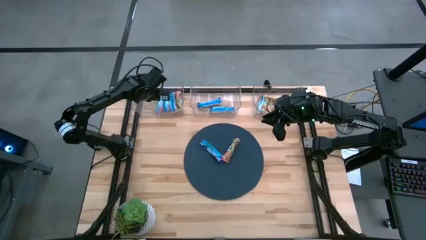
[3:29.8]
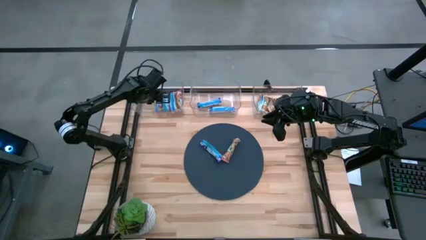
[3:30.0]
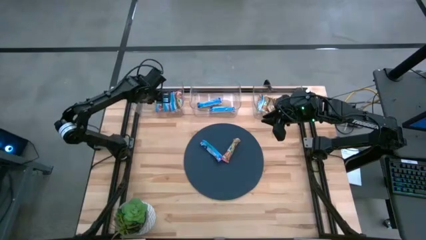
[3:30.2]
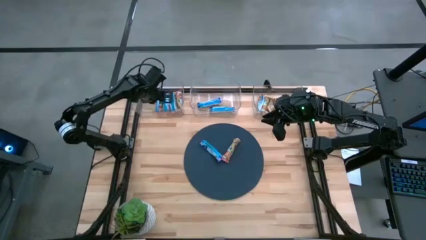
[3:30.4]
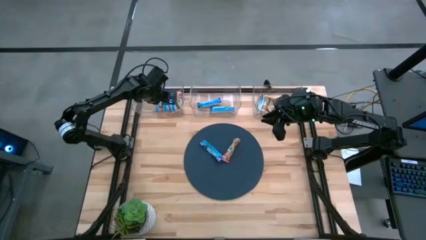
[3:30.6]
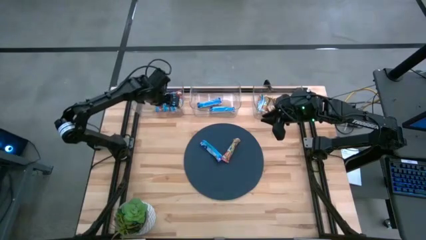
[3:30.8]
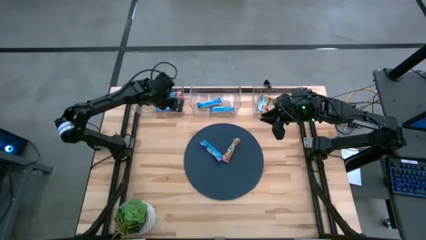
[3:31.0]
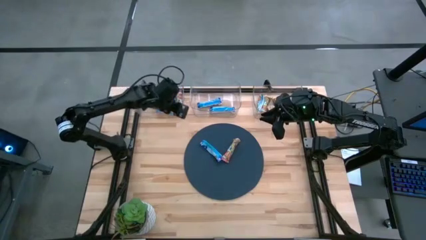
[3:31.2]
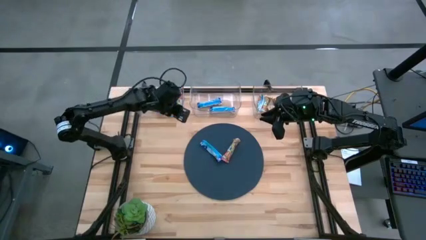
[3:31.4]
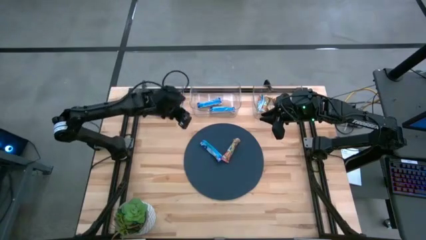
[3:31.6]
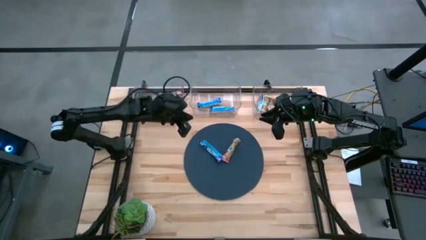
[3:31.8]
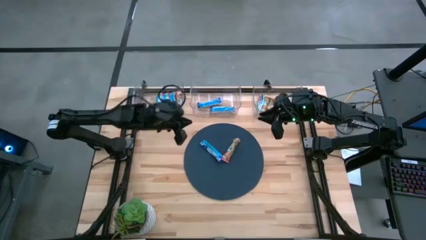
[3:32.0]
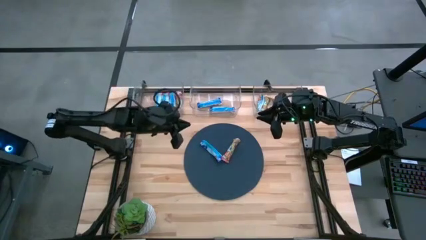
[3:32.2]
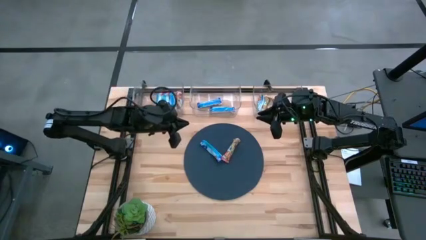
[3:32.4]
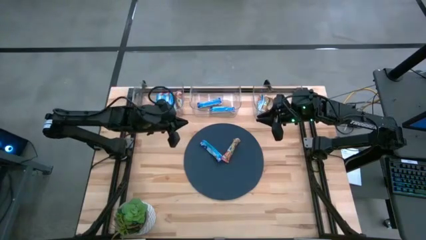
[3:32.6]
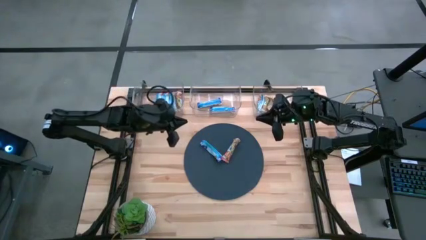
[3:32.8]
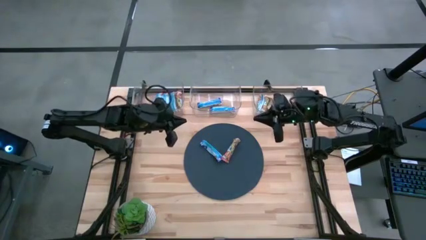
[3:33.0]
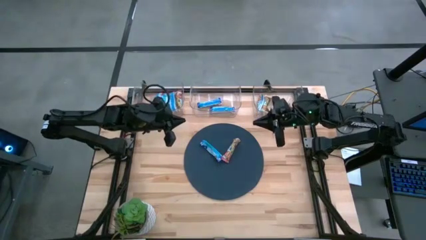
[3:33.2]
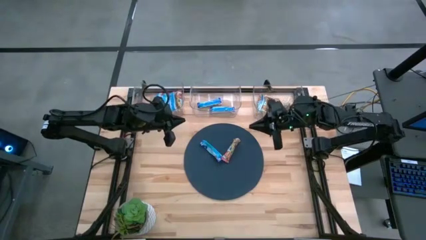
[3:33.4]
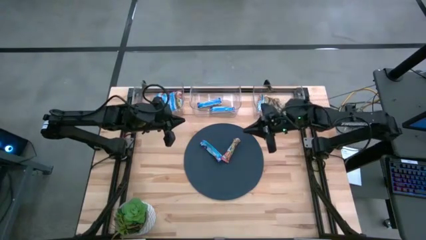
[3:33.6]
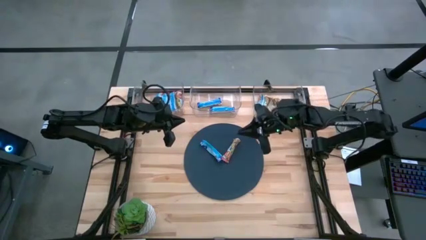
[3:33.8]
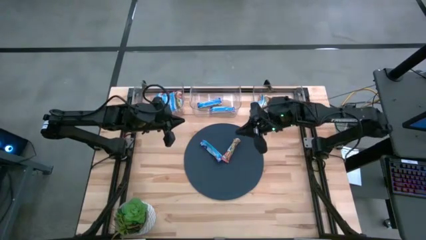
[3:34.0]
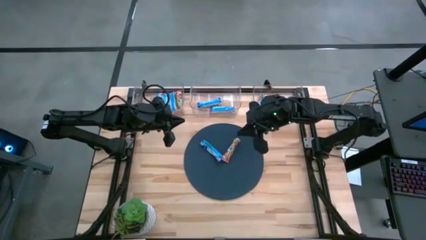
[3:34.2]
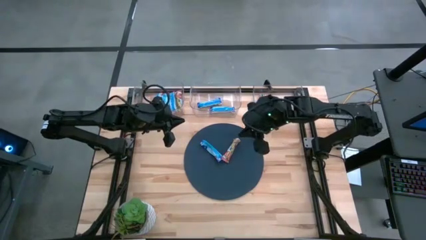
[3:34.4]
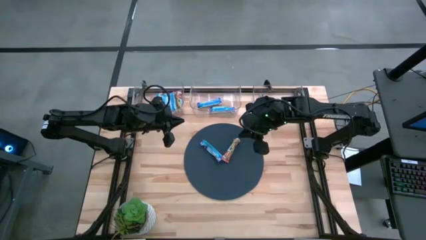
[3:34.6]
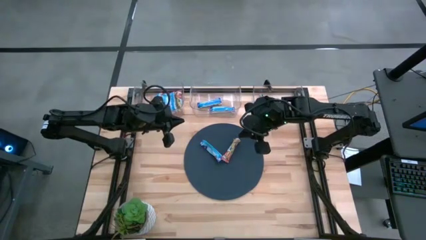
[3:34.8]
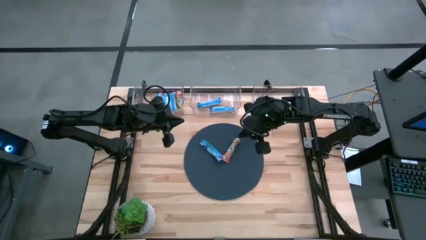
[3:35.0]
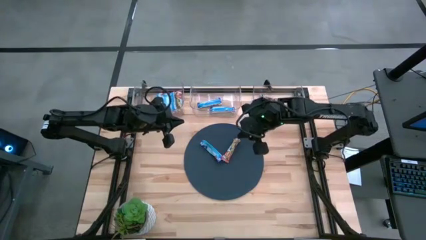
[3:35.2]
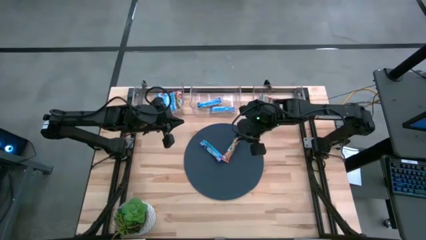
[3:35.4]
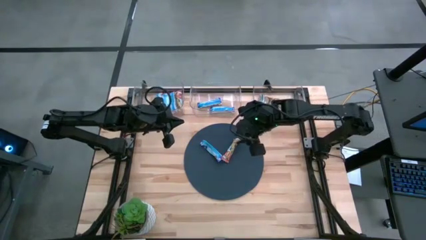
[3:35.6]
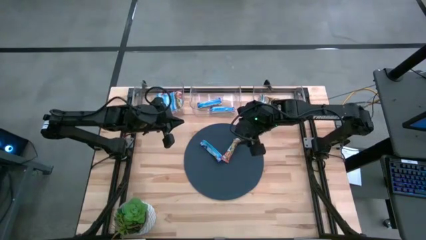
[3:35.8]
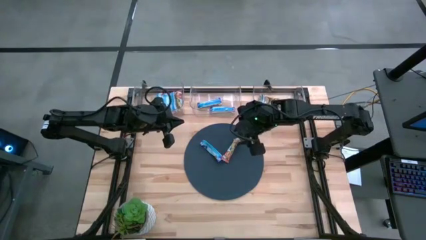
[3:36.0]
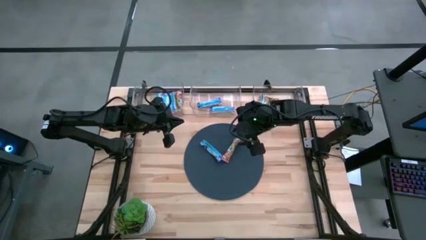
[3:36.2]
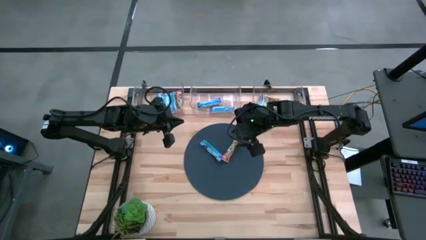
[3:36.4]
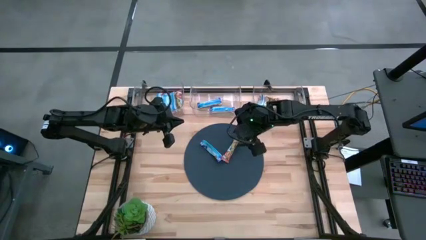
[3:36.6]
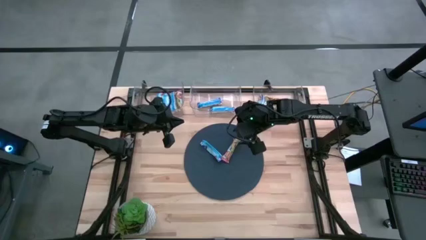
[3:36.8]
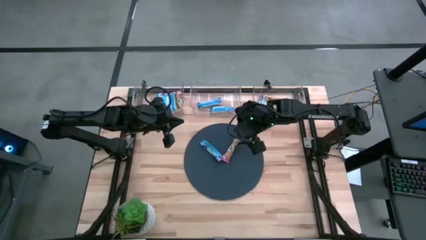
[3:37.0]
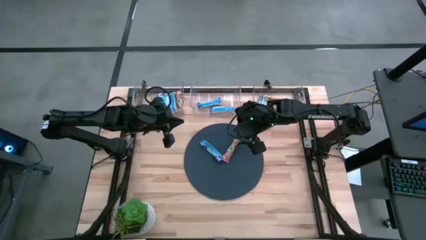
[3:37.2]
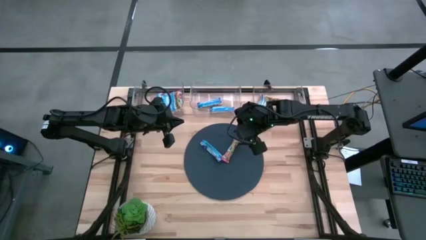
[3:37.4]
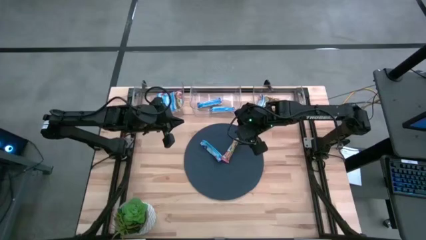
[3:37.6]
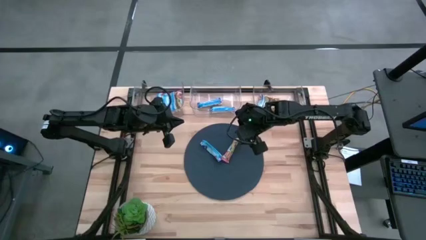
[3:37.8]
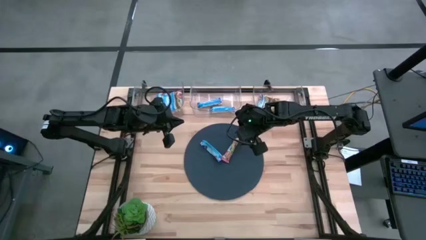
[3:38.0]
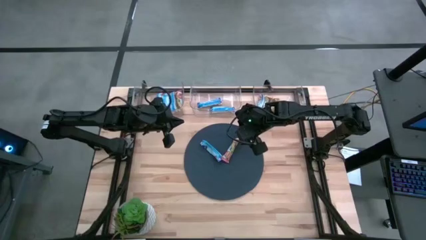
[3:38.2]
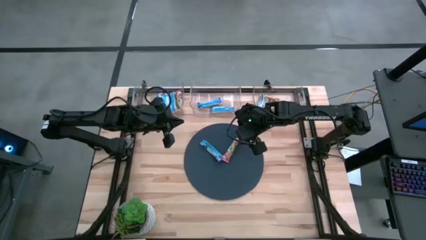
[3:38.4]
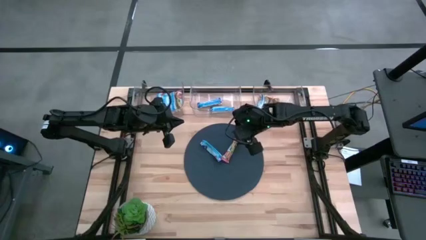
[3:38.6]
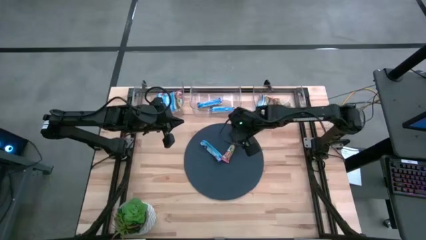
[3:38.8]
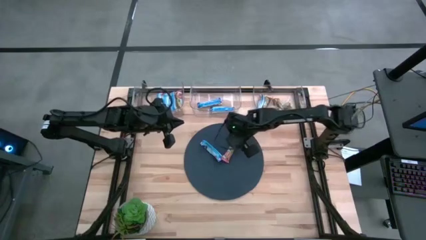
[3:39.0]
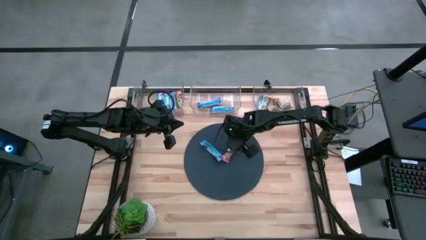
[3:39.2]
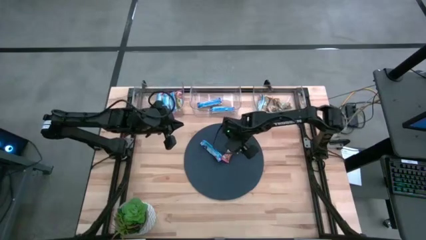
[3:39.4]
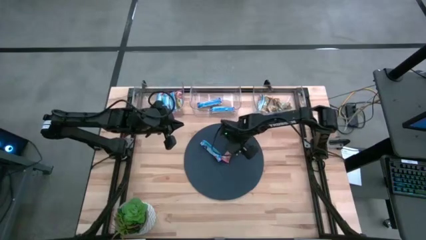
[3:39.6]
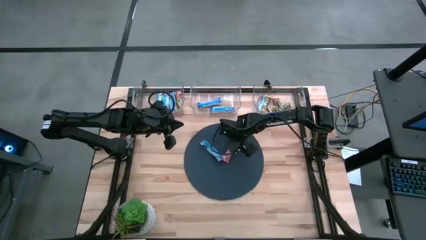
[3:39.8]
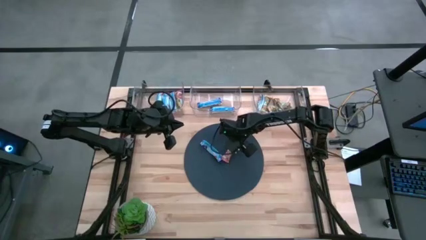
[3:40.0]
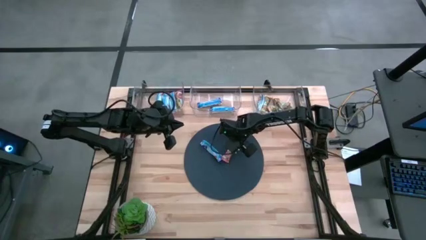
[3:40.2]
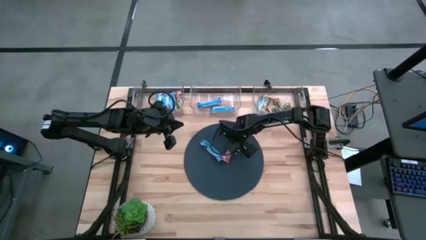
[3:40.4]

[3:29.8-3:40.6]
Task: Pick and place Granola Bars by type
Put the red granola bar into the left transparent bin

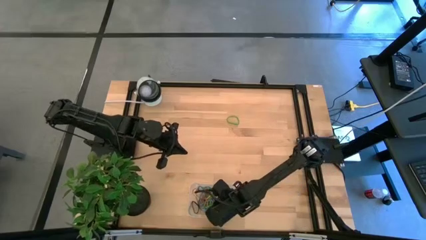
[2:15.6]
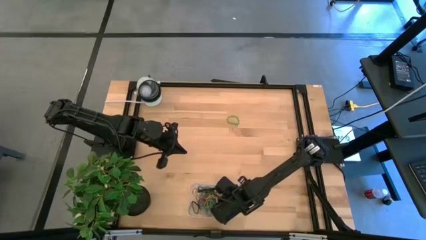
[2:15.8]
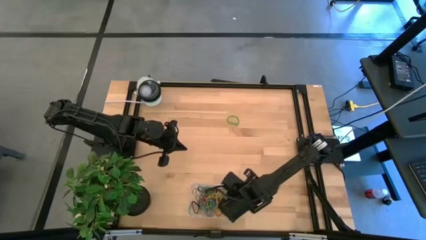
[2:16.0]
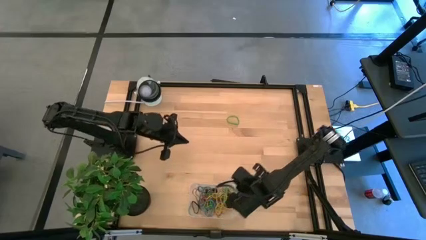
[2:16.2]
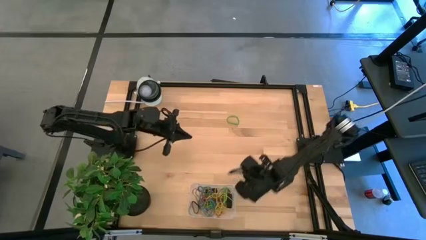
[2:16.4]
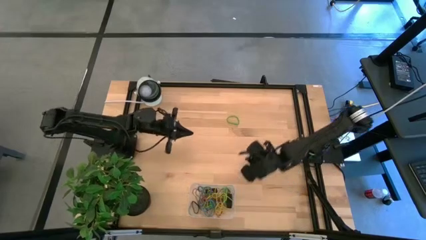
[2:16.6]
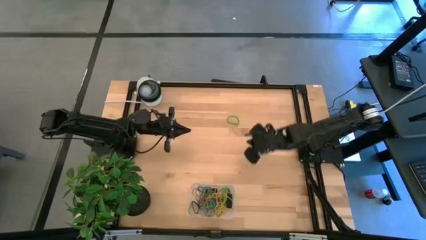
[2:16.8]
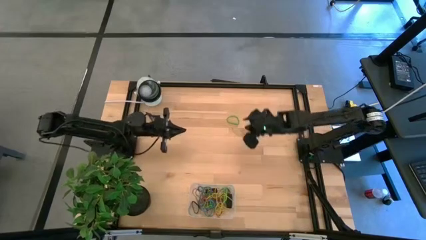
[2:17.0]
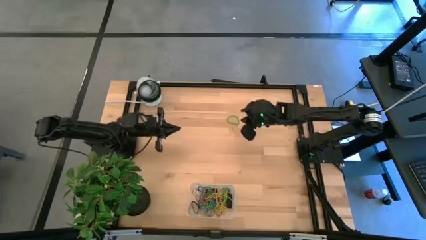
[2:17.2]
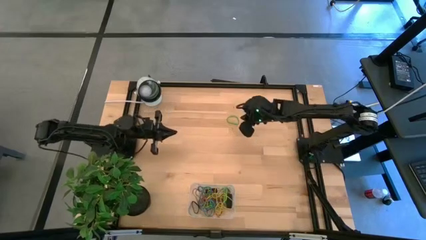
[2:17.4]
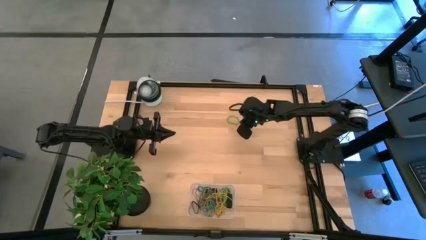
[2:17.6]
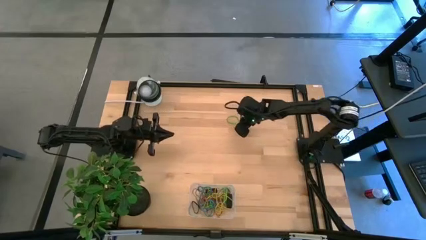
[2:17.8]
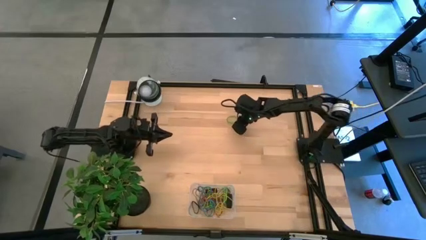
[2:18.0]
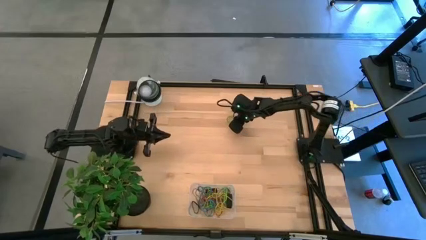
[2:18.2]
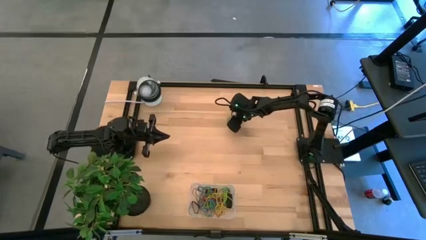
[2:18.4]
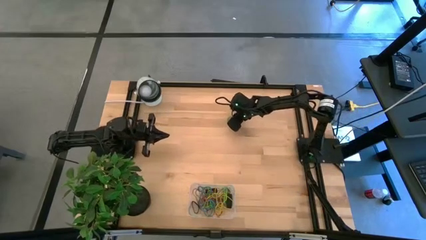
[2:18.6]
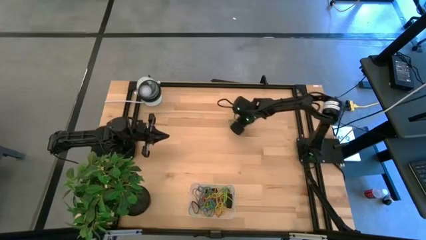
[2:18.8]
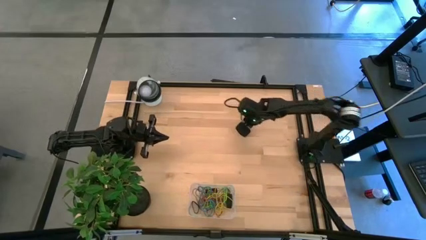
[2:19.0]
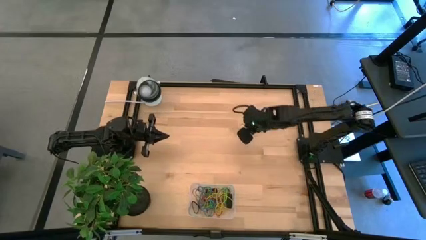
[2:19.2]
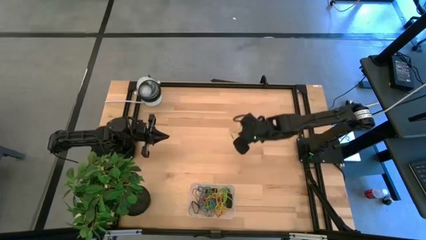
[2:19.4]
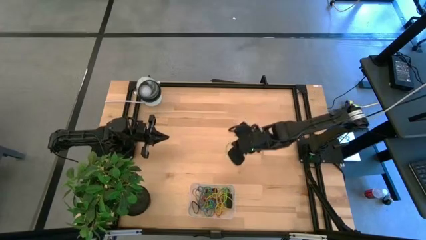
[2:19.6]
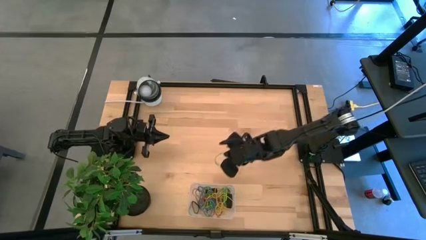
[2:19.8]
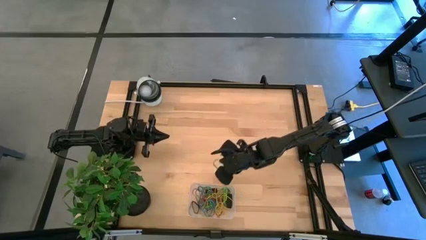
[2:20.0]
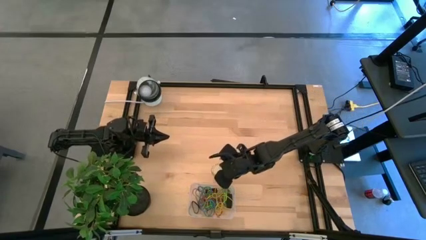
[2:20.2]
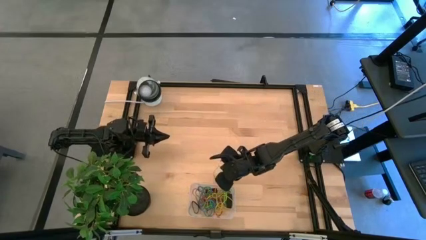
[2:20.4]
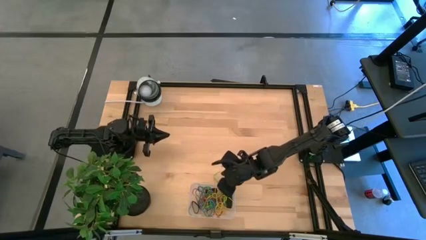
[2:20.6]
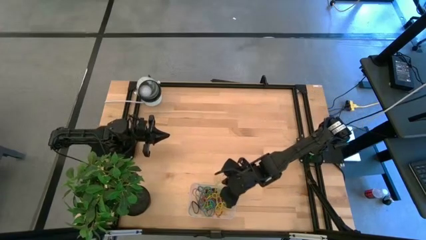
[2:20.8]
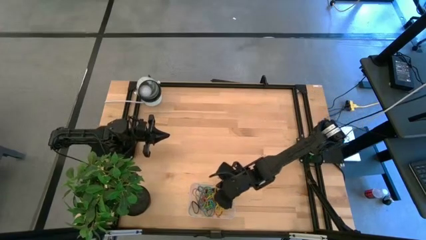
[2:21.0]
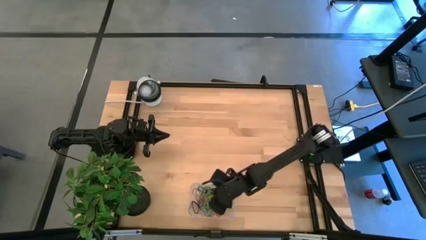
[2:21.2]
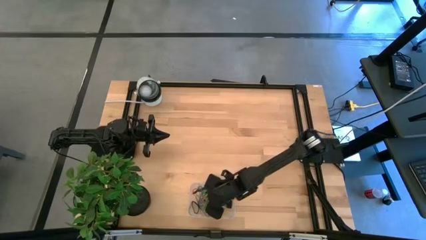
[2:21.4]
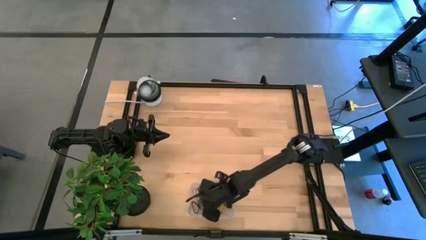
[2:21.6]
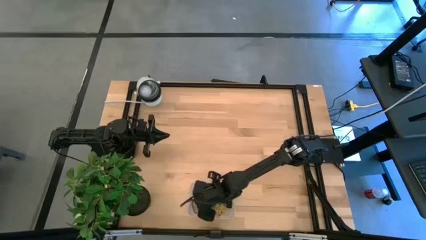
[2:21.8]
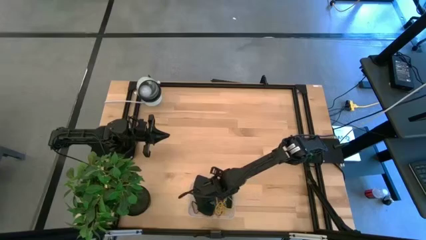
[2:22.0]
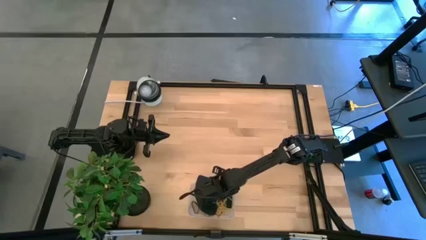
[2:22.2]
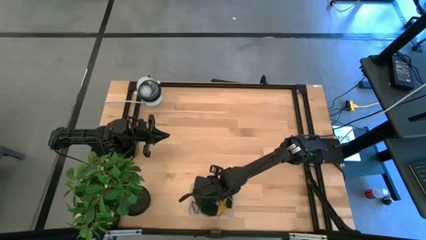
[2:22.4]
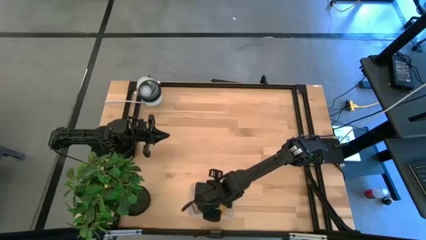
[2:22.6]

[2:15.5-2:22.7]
Task: Pick and place rubber bands into bin
Put the green rubber band into the transparent bin
